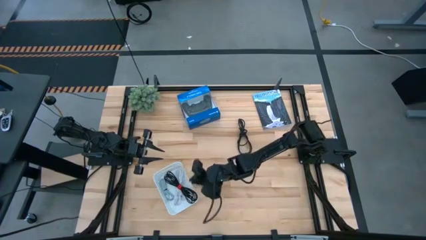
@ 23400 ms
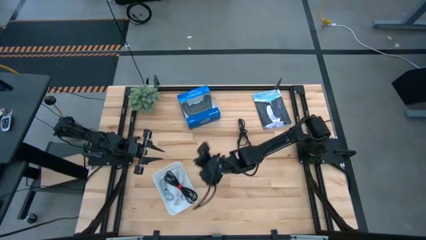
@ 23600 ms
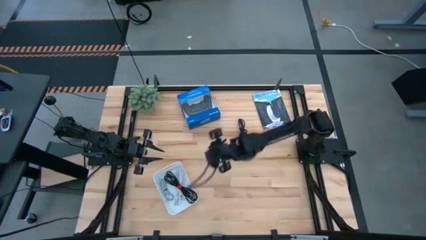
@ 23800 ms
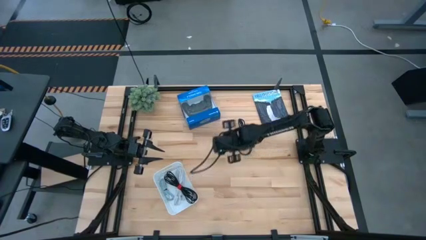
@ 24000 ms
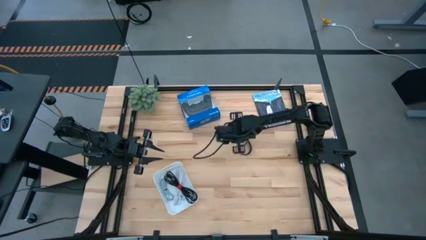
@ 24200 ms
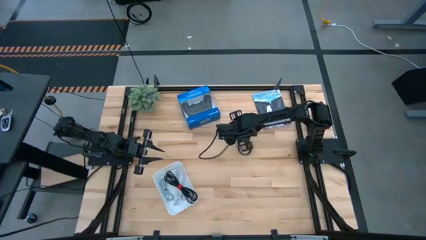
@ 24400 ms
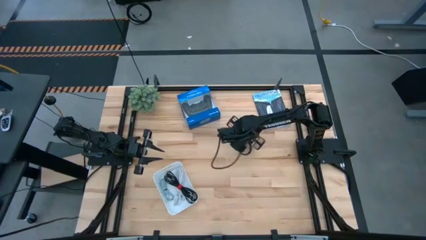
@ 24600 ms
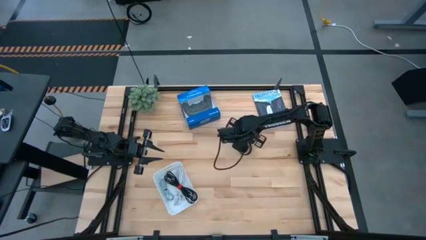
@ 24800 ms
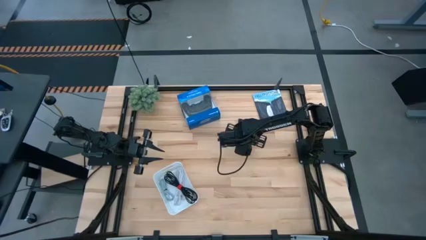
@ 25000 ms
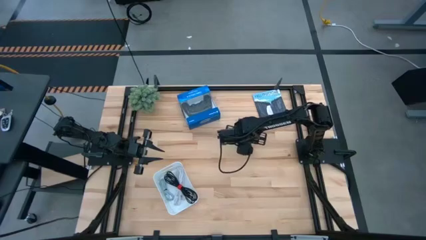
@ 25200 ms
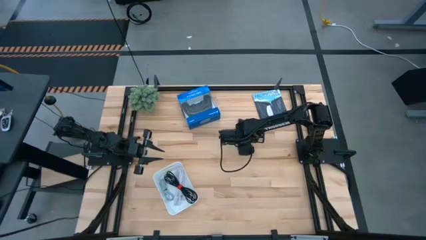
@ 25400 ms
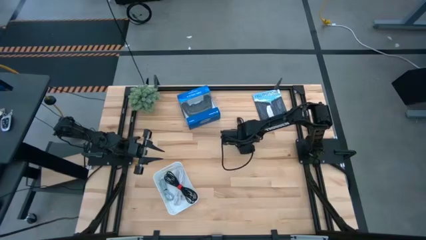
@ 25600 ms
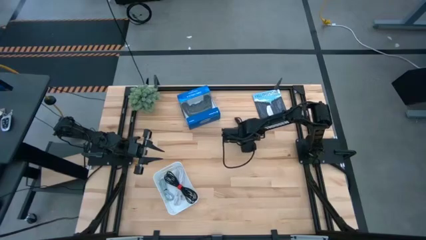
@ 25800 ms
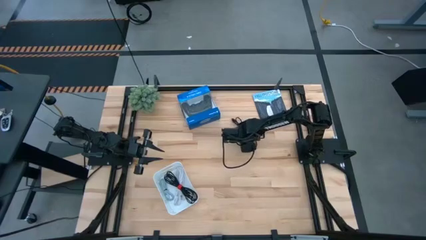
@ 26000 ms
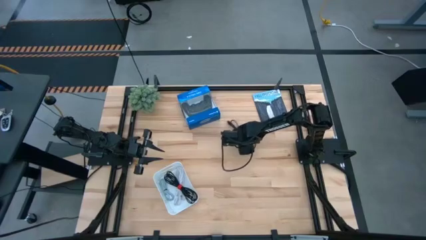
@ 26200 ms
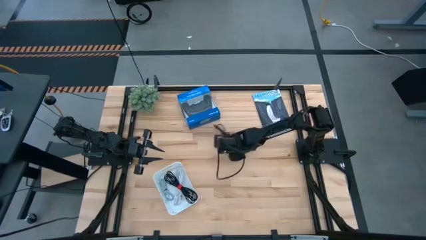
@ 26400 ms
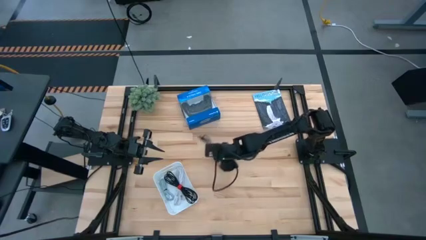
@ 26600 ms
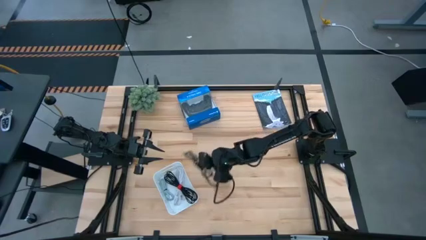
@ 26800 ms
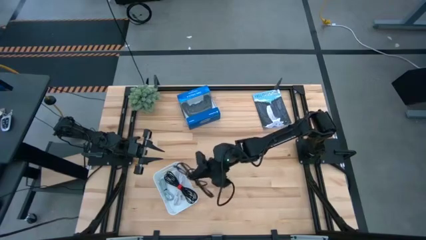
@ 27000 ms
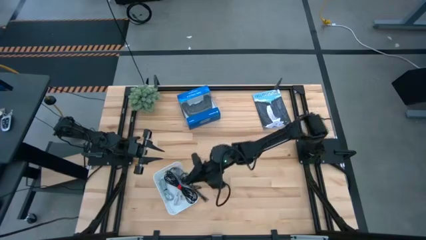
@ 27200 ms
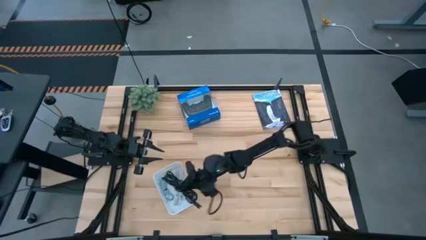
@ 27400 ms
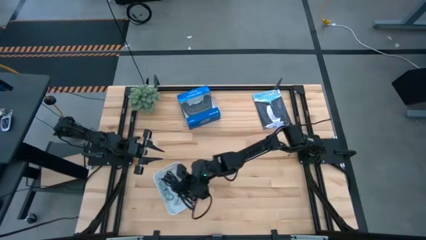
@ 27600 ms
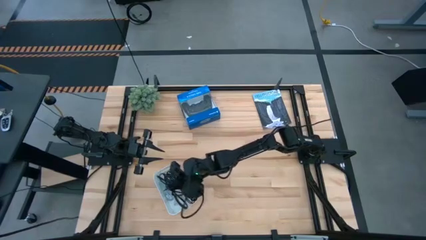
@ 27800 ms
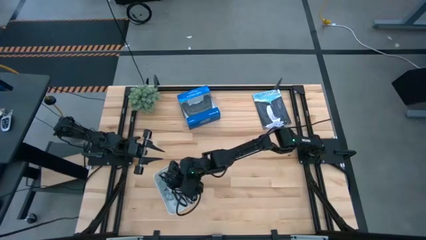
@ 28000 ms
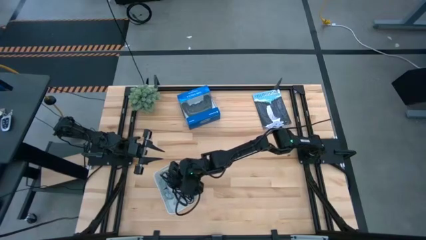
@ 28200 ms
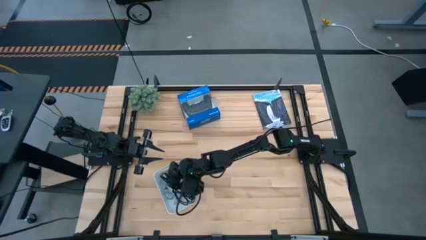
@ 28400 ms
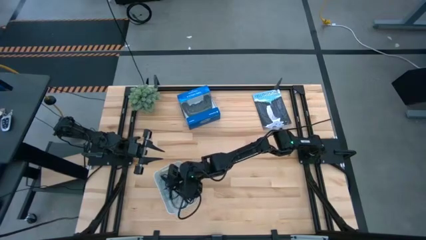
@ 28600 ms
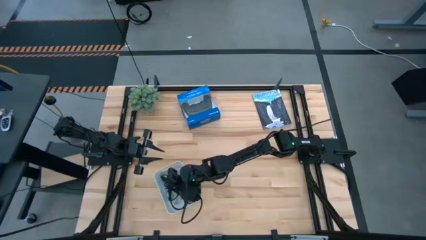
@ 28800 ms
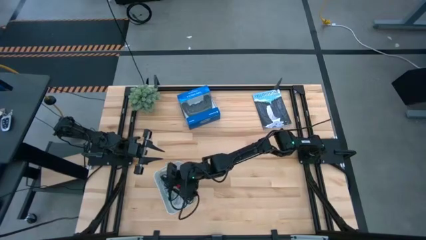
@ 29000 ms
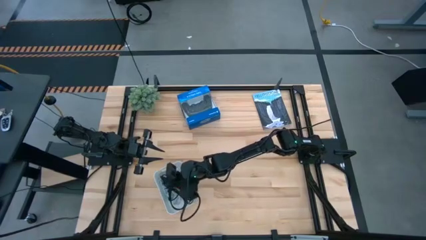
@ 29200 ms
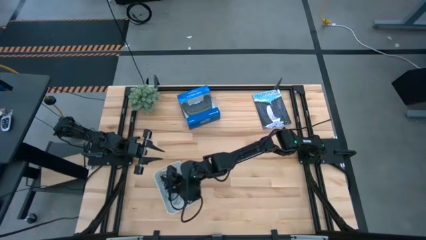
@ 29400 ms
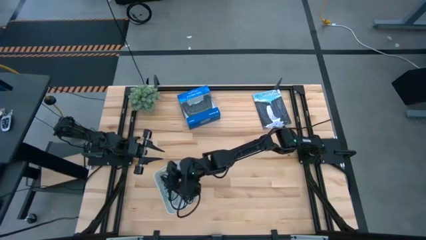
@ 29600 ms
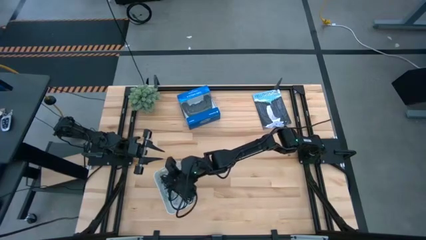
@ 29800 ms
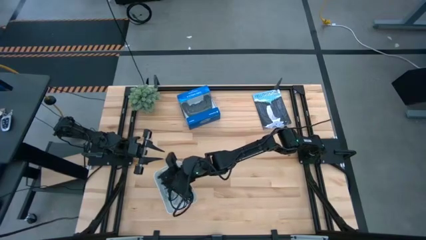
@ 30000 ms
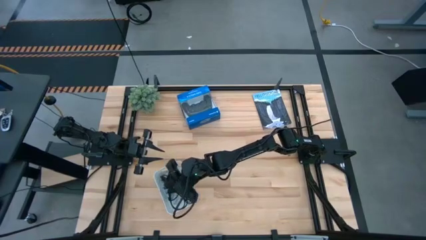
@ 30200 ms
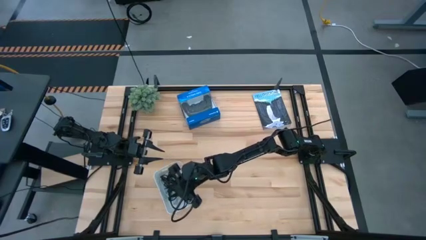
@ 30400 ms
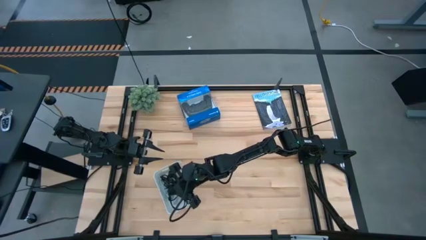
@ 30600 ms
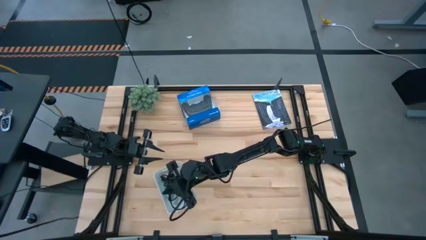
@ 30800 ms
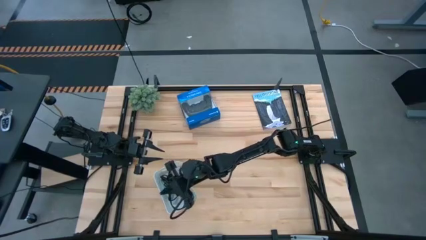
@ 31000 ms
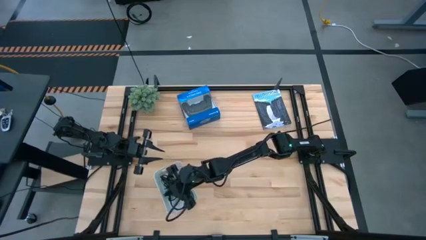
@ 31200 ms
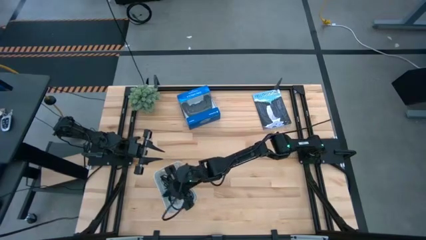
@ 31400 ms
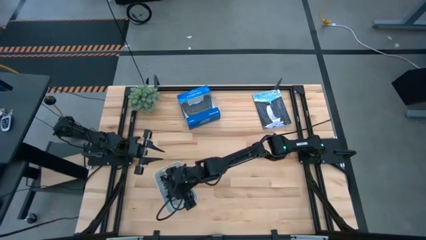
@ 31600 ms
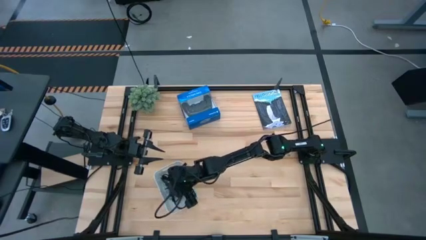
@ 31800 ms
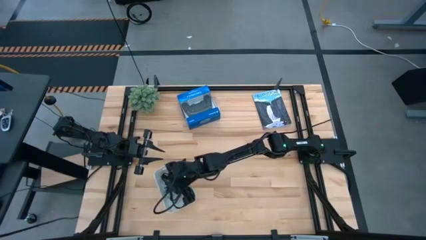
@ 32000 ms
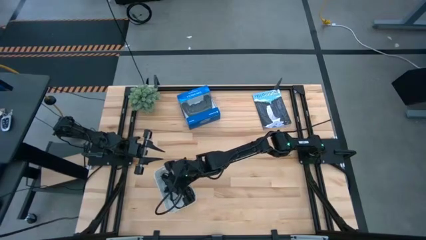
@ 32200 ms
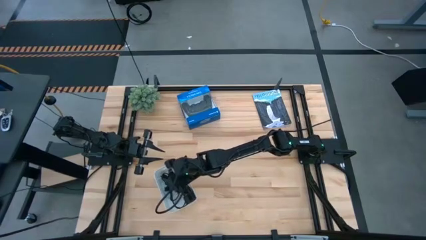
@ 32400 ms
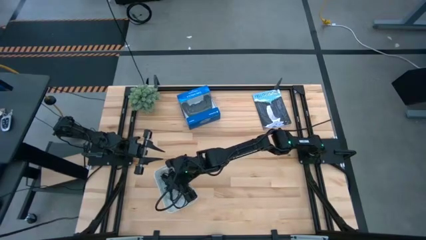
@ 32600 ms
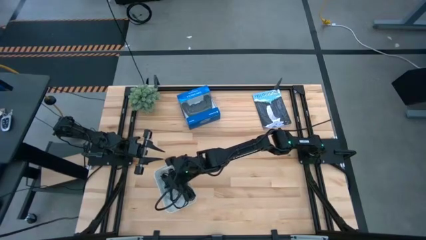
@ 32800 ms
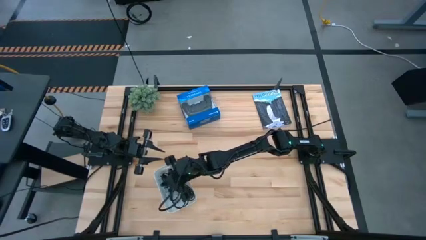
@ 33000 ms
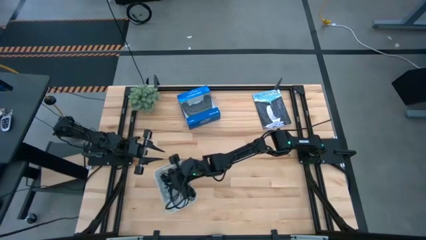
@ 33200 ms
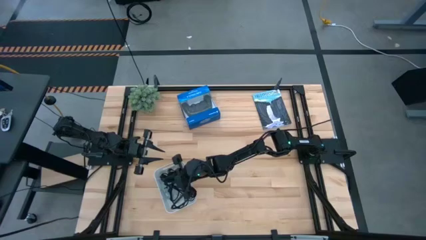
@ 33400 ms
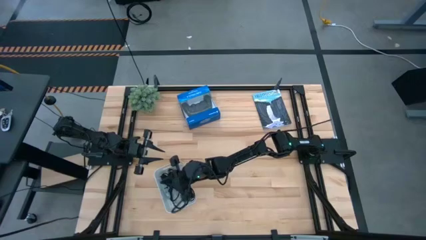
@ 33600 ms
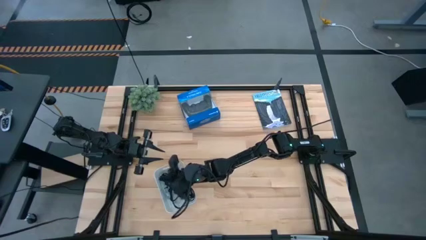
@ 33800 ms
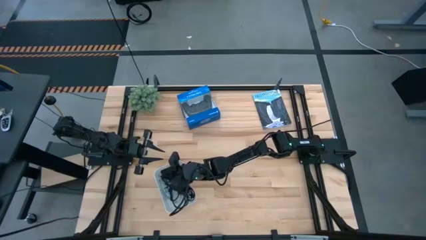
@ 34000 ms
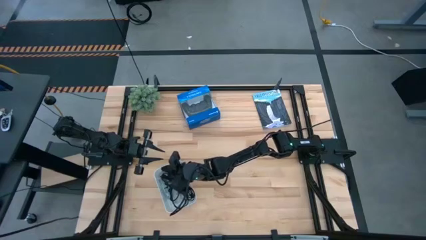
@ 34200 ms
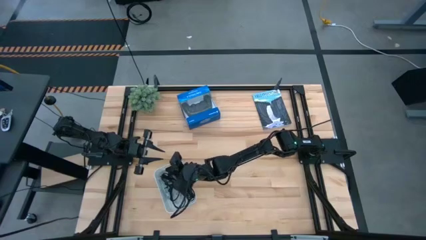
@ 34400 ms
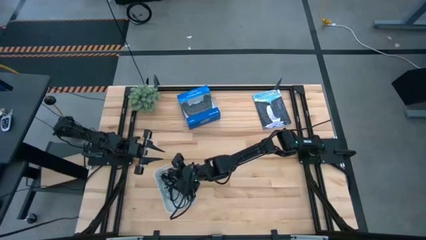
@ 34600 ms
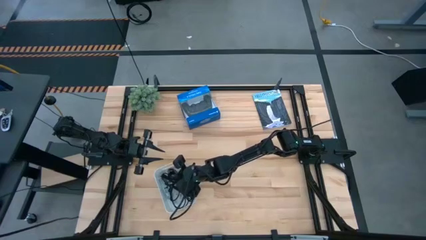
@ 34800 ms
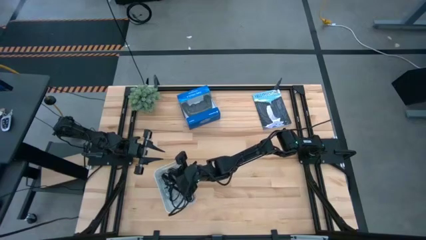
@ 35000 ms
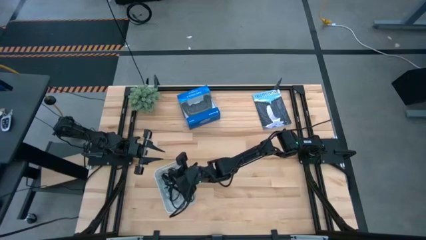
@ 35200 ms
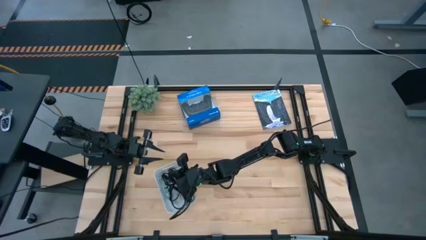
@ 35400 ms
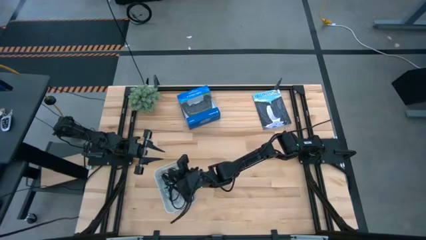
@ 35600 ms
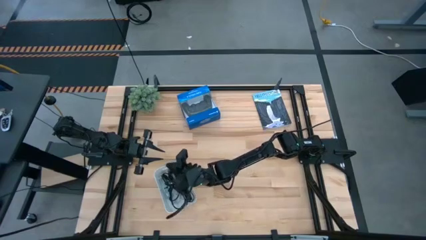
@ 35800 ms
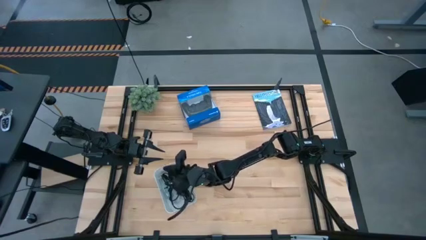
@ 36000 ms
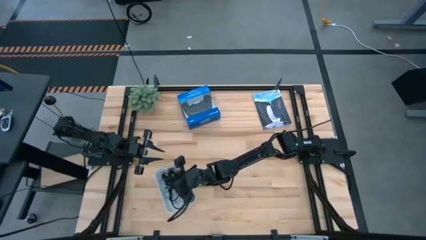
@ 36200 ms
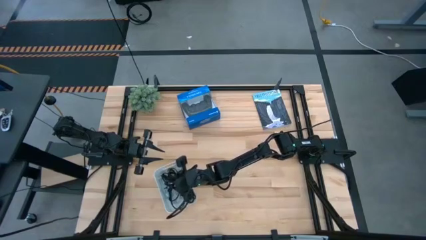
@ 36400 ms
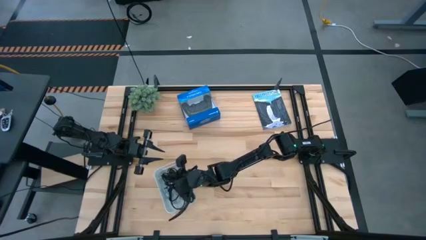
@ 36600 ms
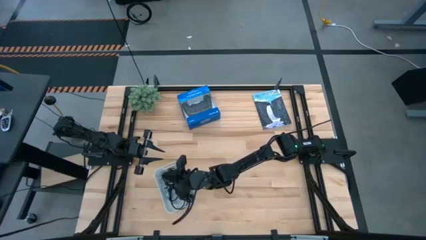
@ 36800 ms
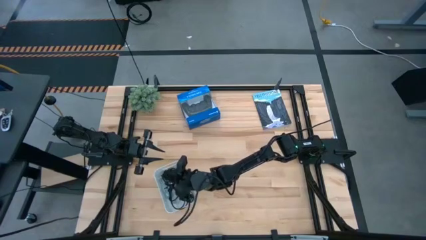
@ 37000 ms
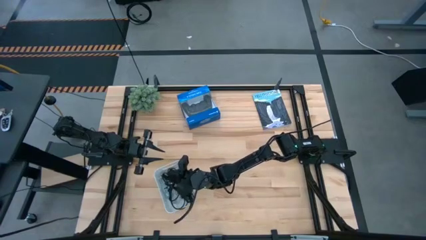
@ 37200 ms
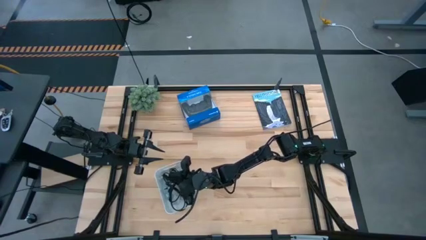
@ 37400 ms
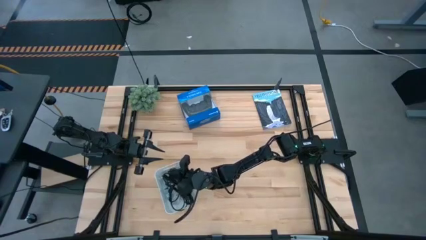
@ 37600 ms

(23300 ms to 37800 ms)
Task: Pick and place USB-C Cables
Put the black charger cable into the white basket
